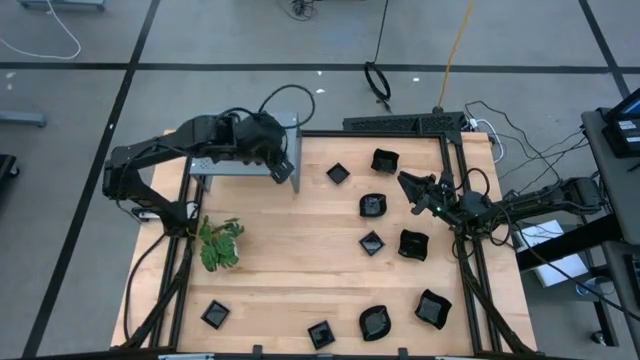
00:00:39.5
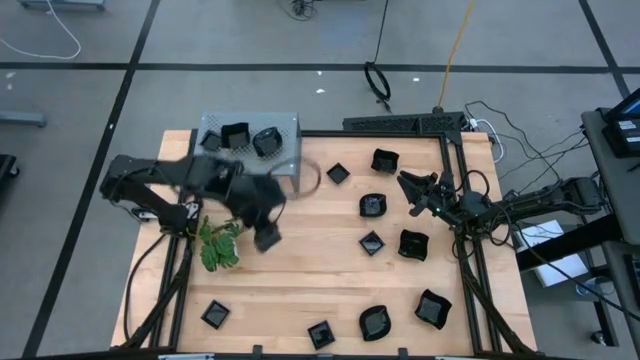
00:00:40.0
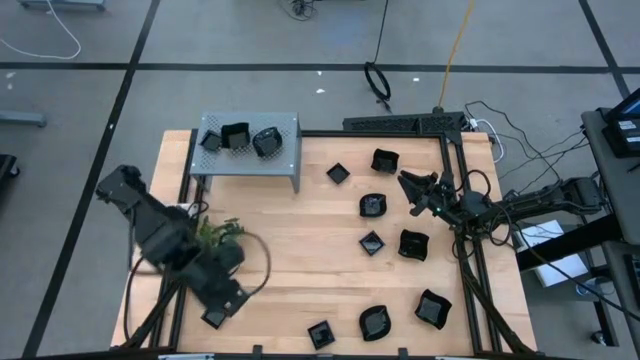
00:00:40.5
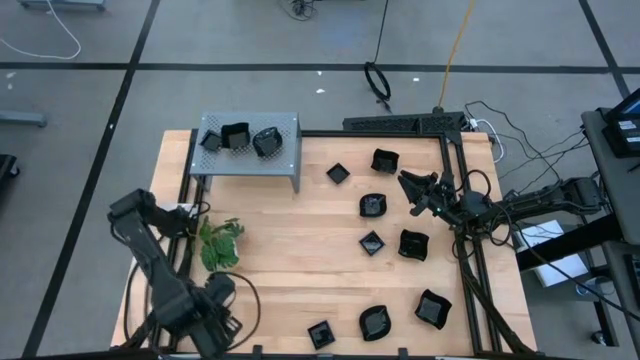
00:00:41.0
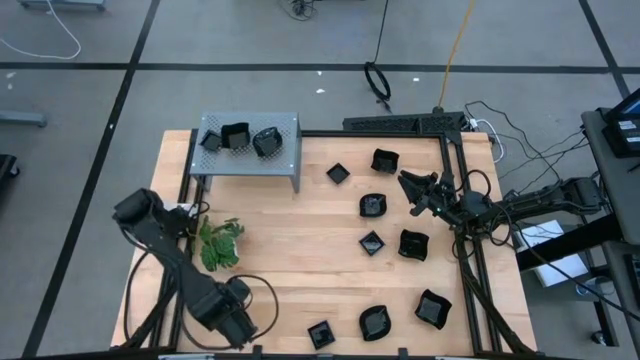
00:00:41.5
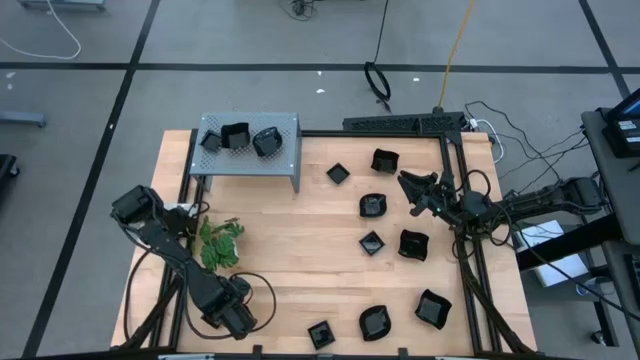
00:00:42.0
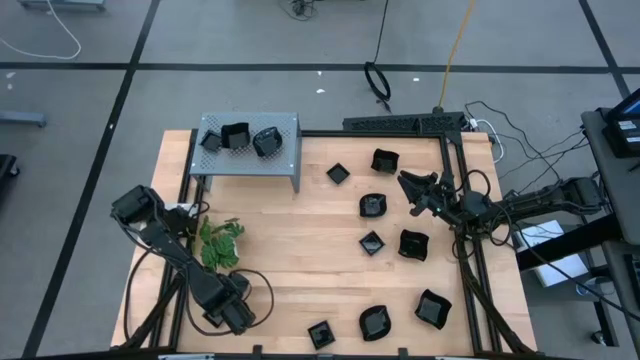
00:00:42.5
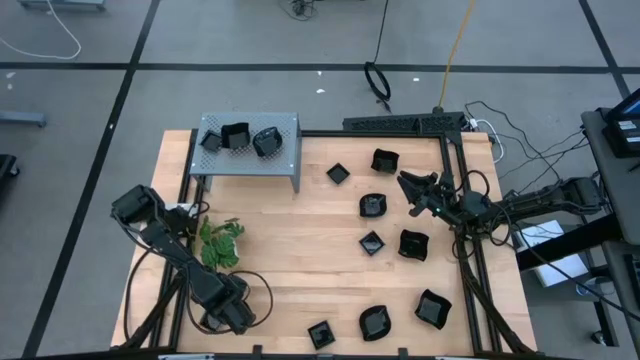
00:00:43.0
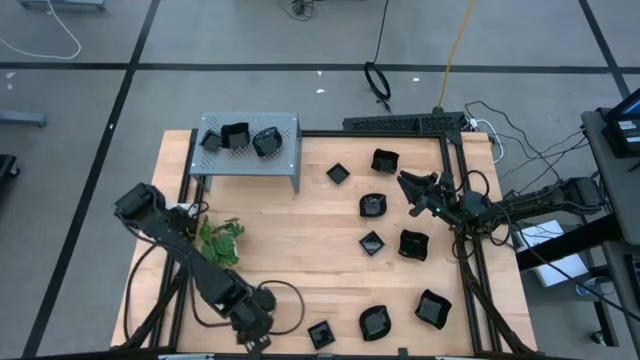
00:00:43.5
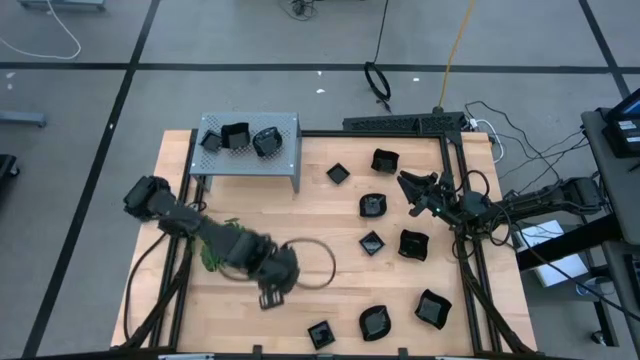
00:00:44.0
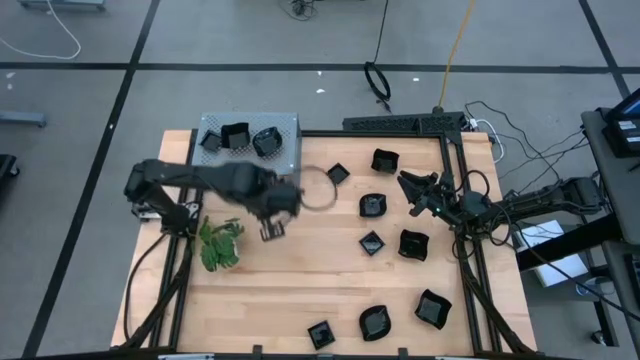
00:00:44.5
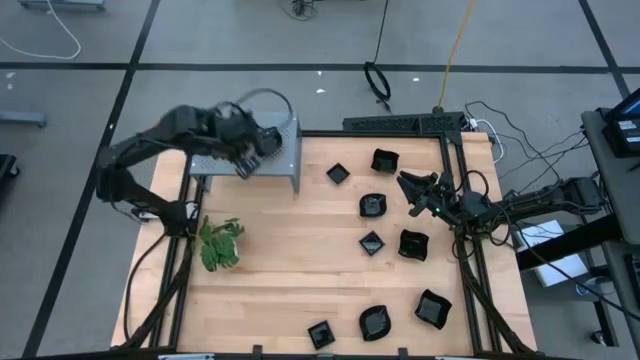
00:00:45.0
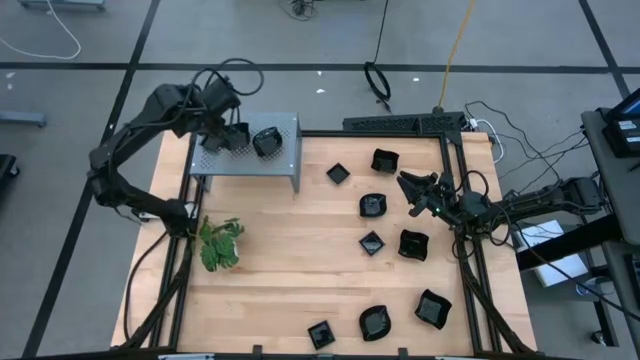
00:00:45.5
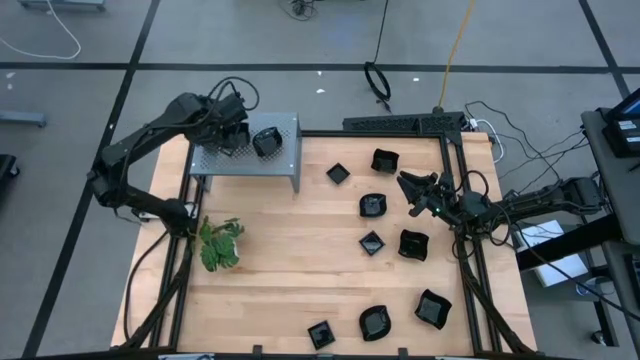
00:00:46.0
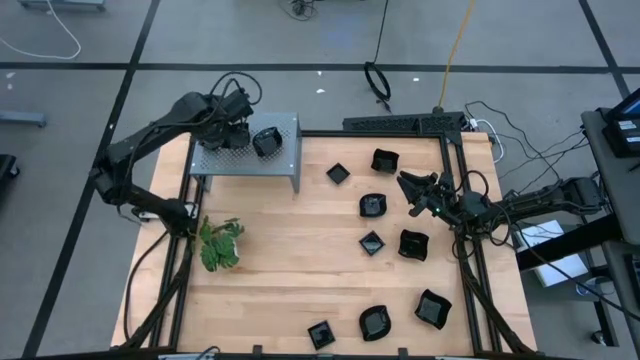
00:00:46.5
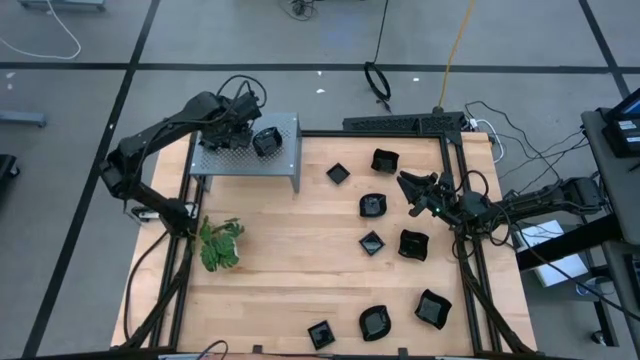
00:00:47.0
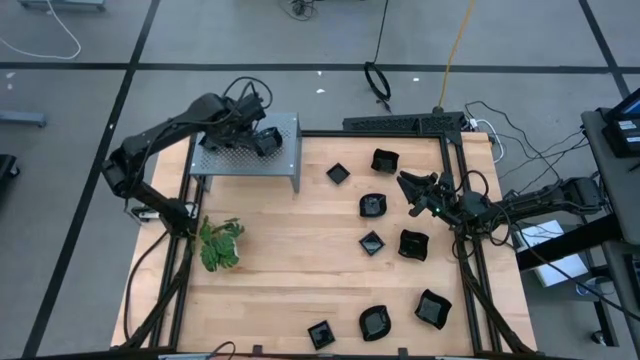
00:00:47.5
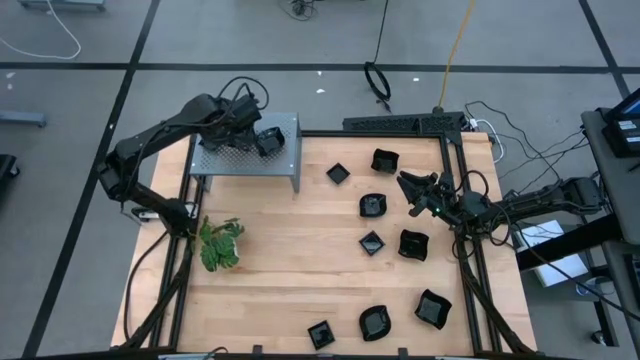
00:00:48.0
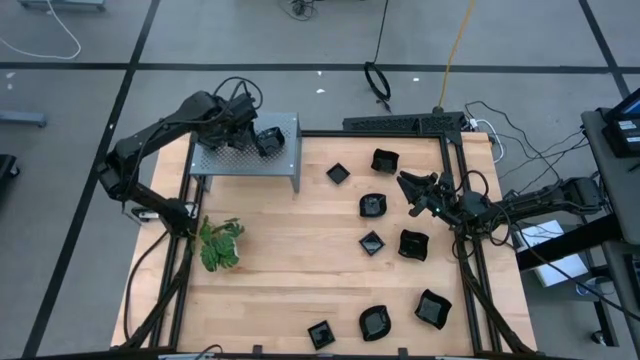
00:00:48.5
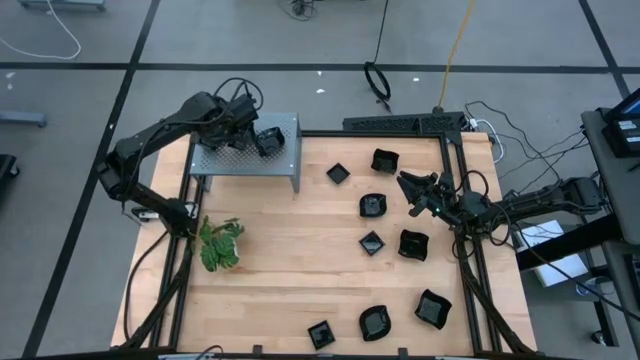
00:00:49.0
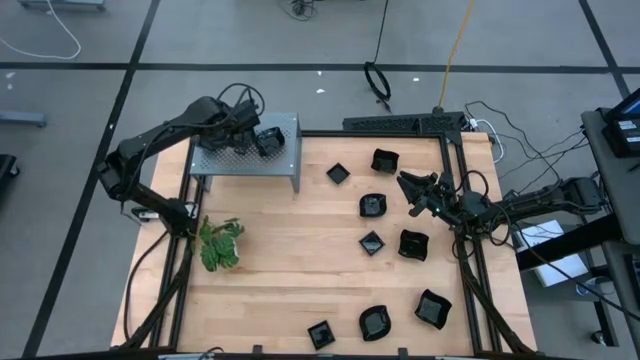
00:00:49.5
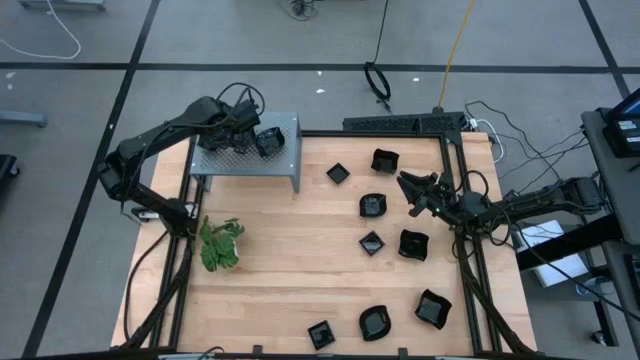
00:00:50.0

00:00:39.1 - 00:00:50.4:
Task: Pick & Place Mini shaped plates
Stack the square plate on top of the square plate on the shelf

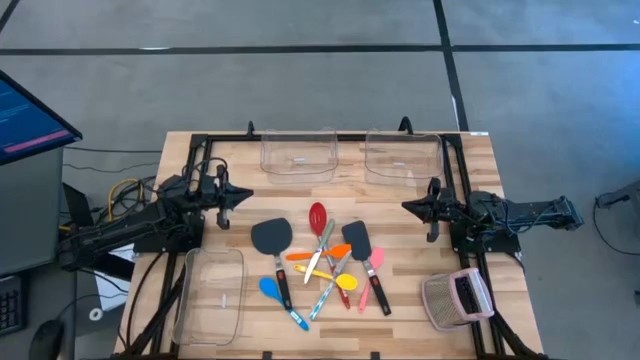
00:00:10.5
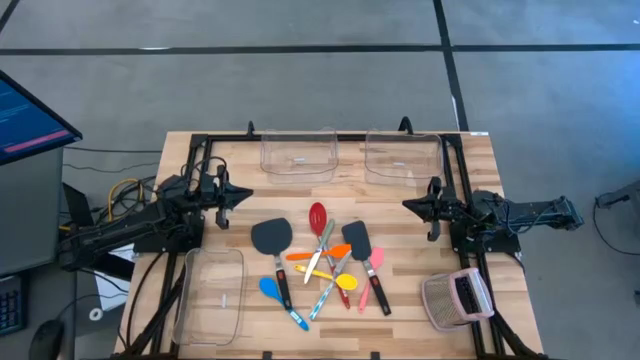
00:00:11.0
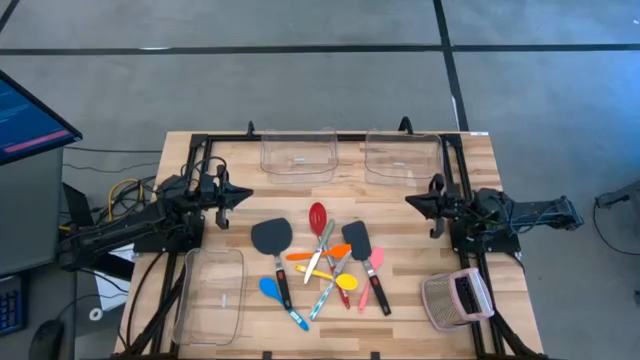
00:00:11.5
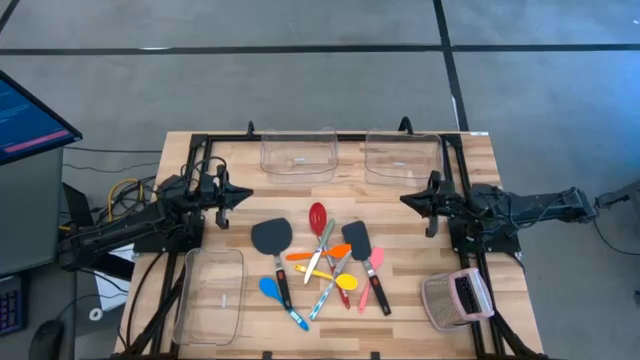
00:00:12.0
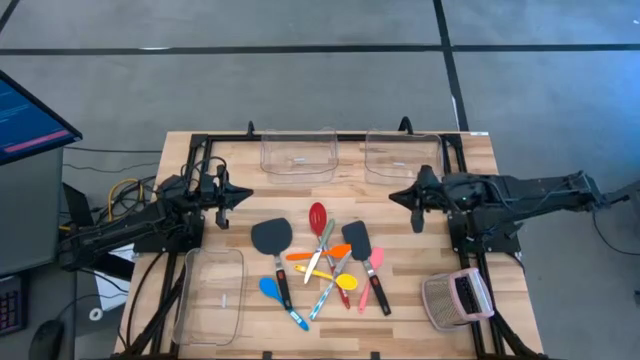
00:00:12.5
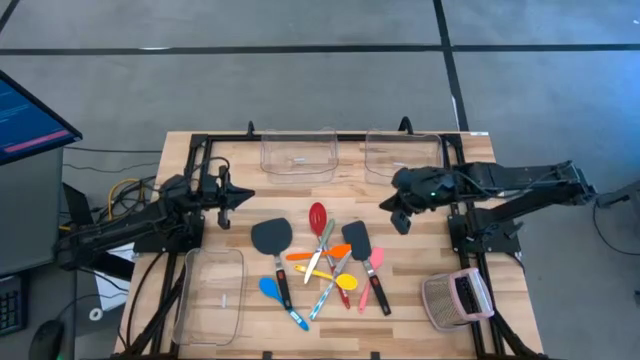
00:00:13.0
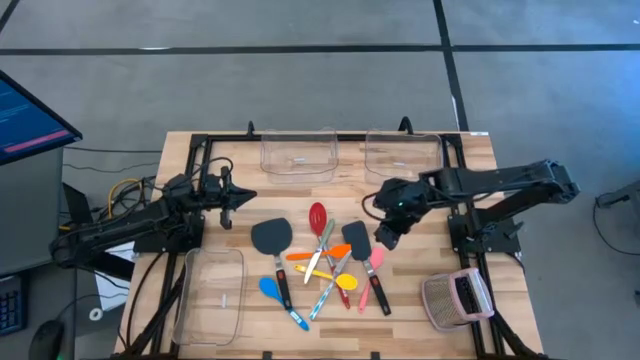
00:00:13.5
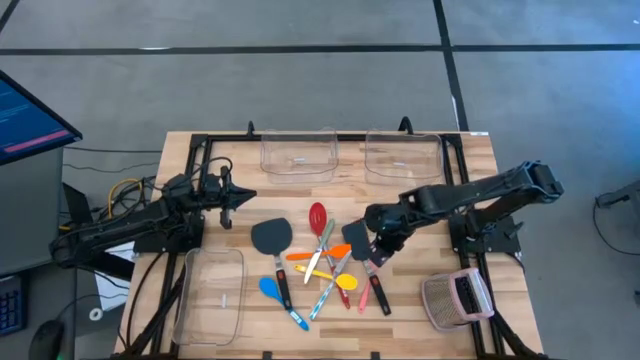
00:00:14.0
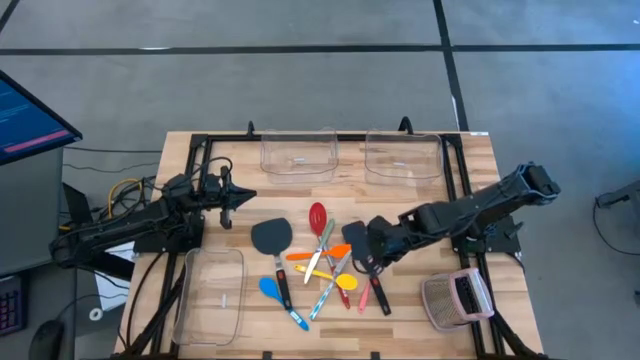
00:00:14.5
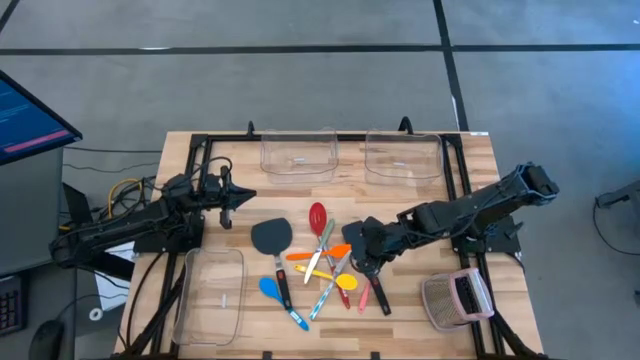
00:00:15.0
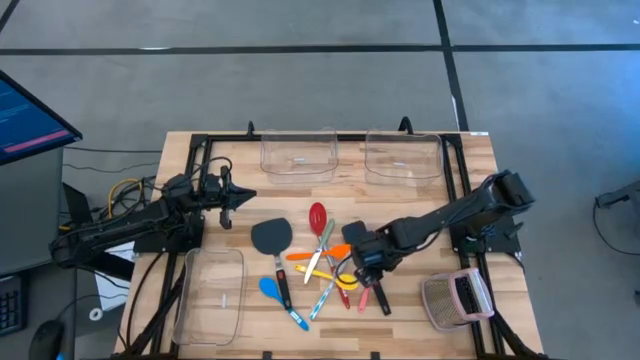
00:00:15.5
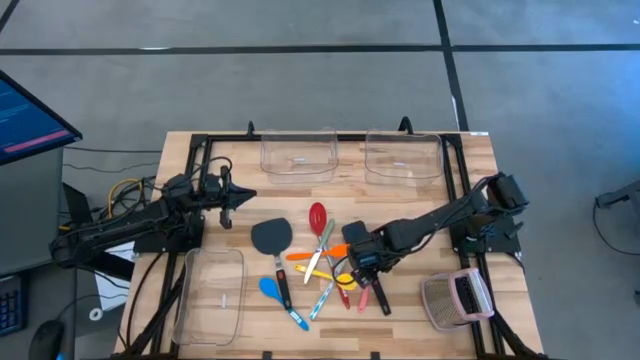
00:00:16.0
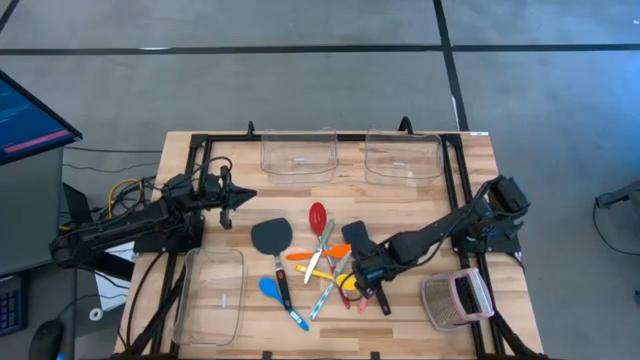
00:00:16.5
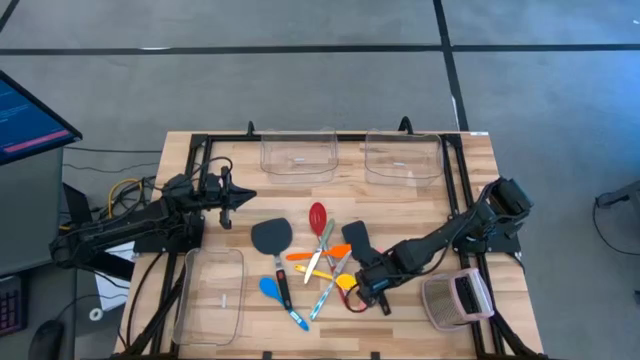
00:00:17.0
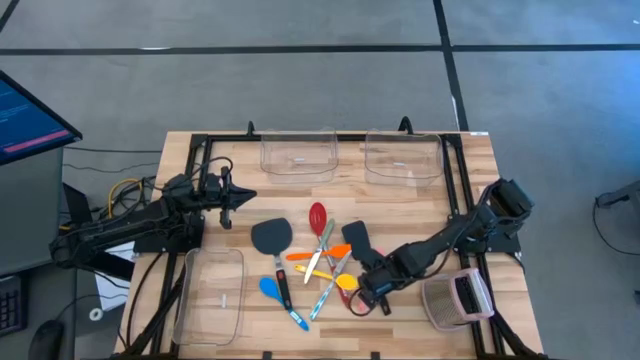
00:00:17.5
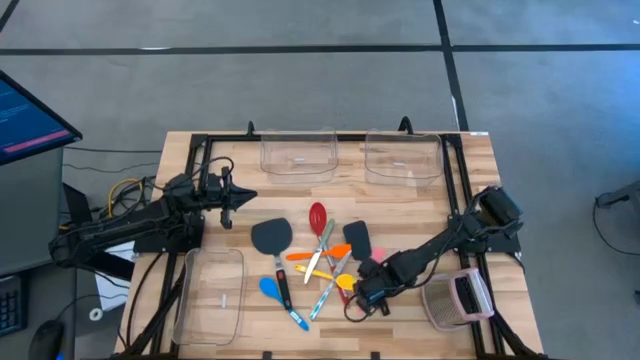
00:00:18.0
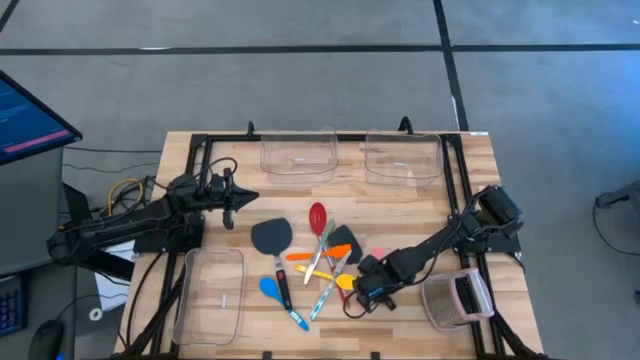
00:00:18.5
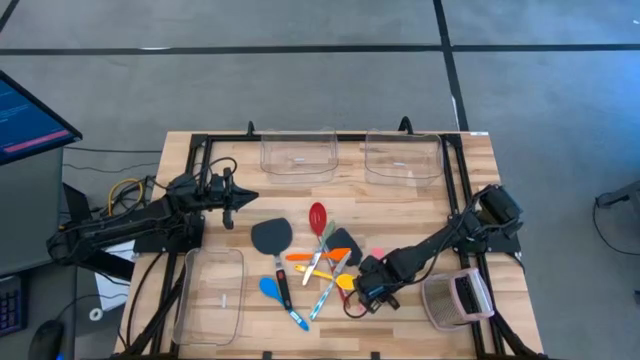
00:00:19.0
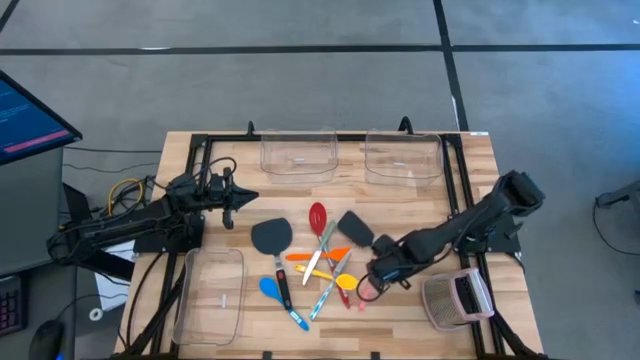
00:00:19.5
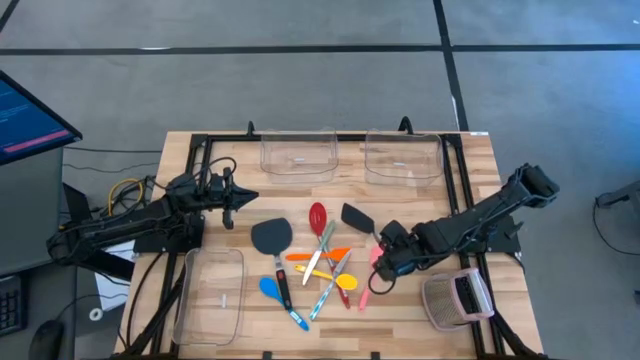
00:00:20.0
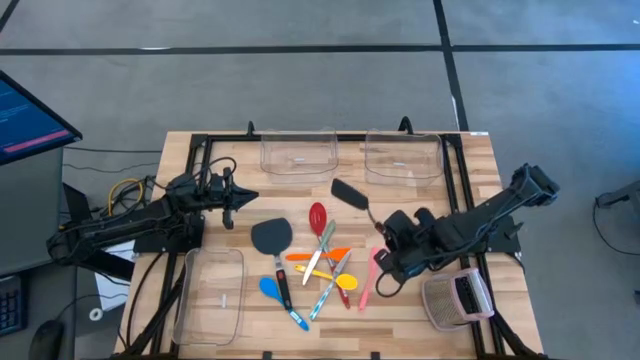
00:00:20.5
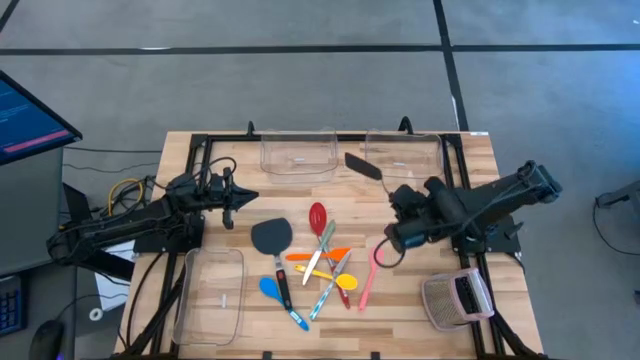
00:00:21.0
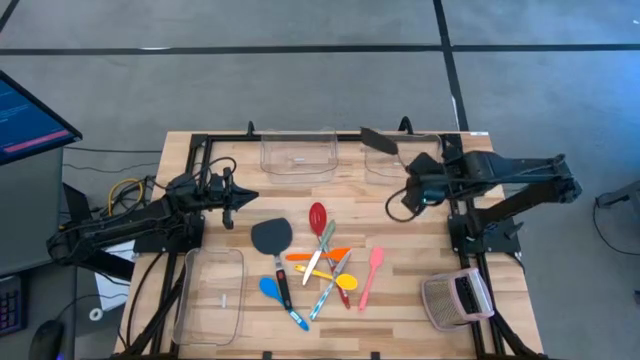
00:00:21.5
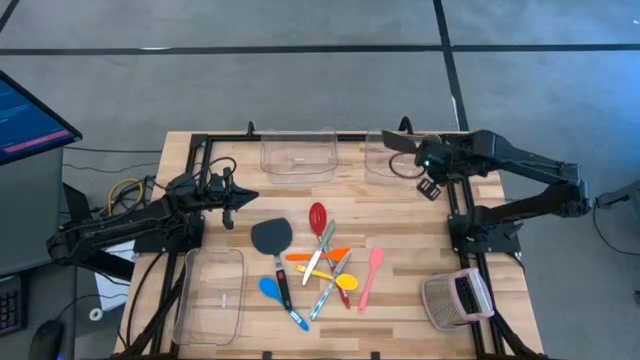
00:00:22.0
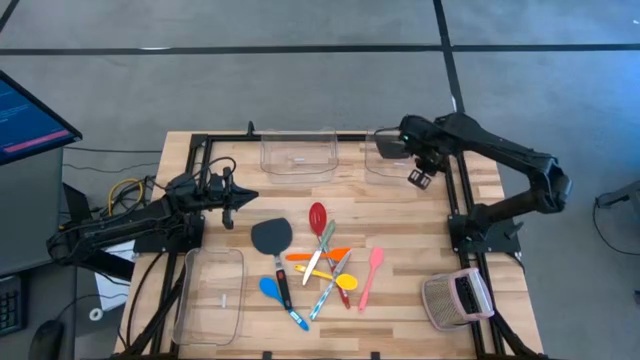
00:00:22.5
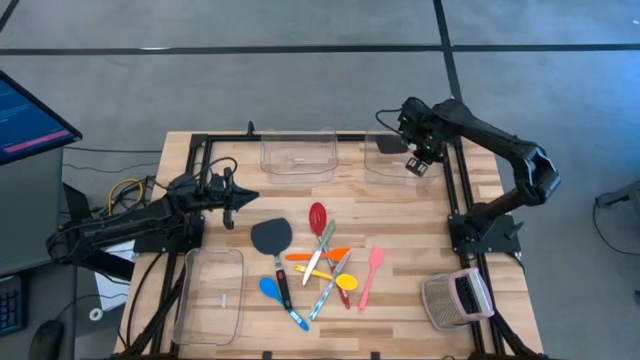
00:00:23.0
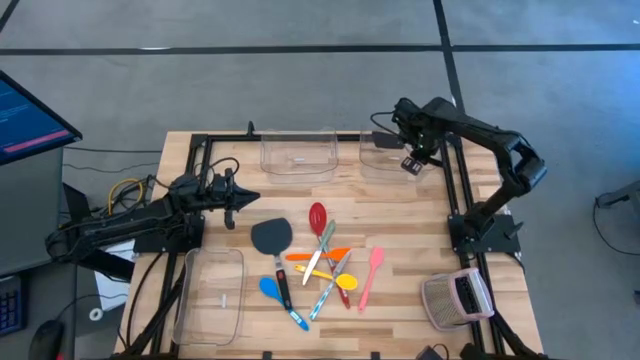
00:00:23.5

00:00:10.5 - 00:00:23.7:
Task: Pick & Place Kitchen Items
Put the right black spatula into top right transparent bin
